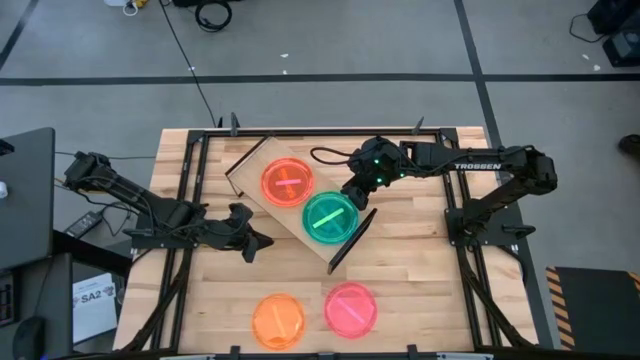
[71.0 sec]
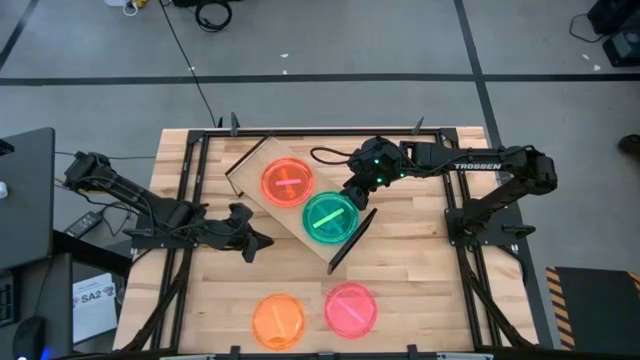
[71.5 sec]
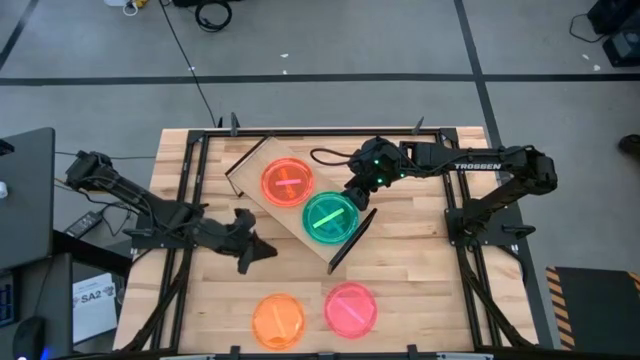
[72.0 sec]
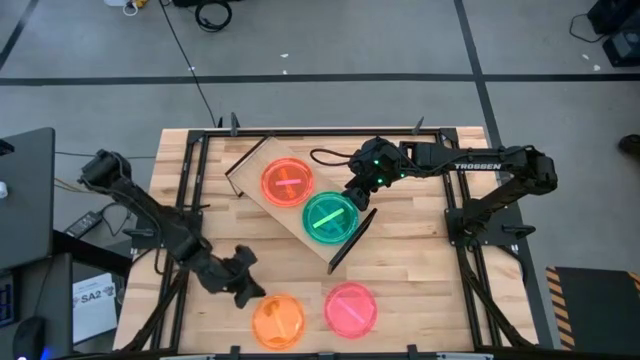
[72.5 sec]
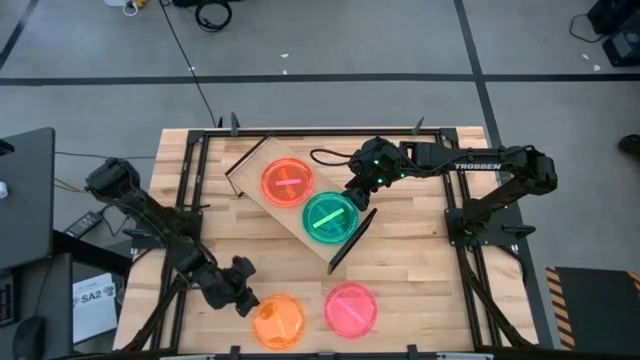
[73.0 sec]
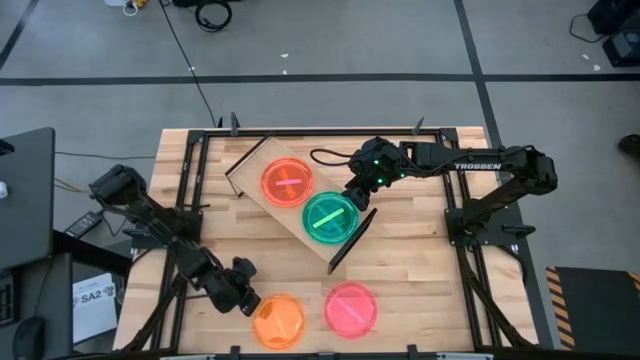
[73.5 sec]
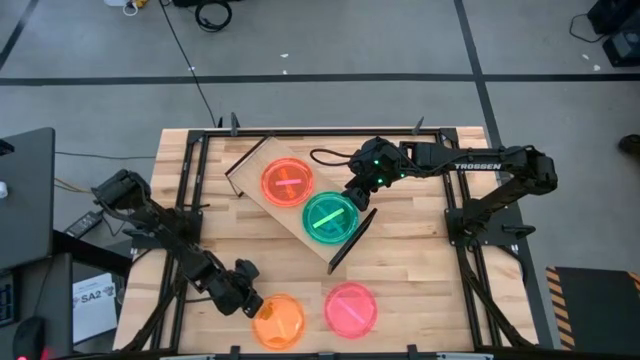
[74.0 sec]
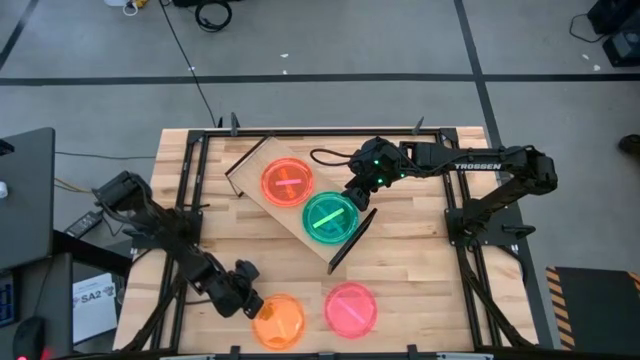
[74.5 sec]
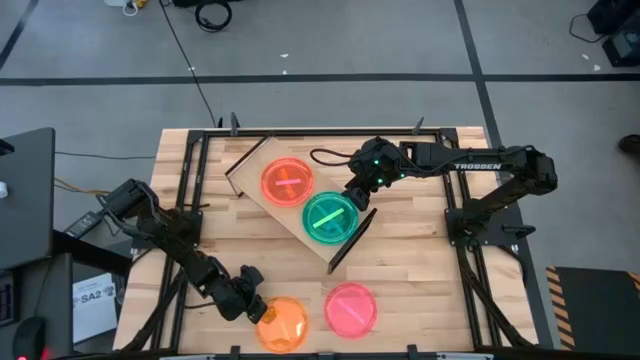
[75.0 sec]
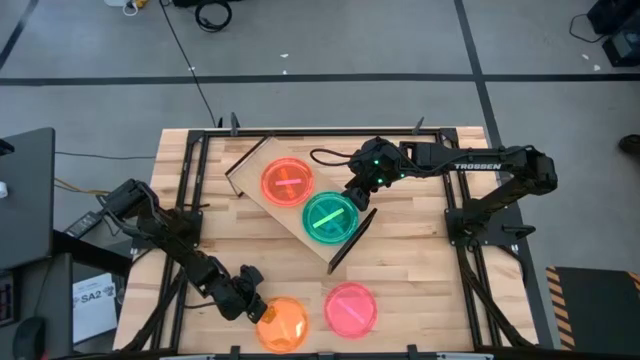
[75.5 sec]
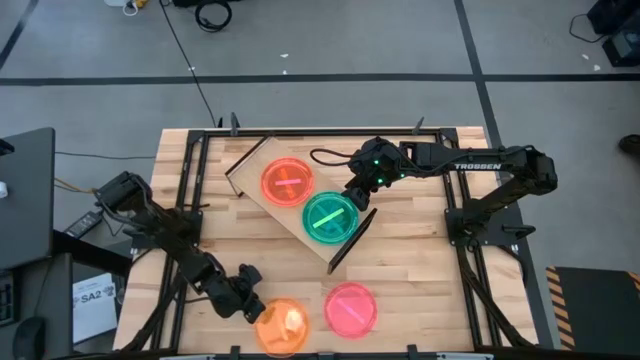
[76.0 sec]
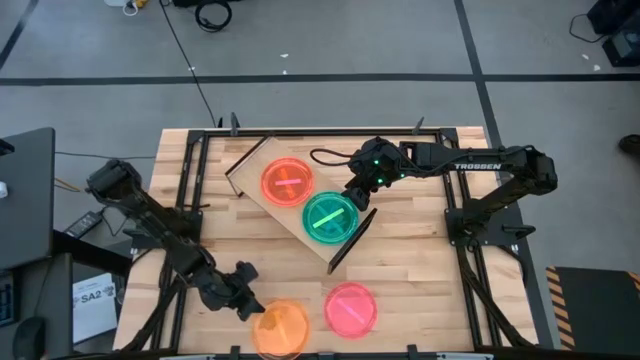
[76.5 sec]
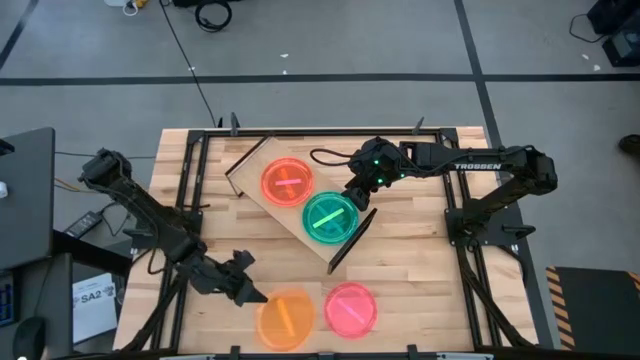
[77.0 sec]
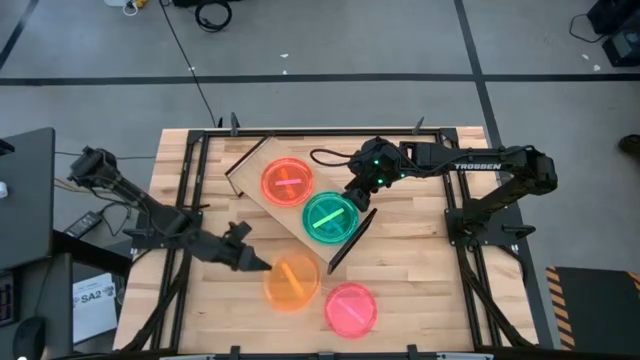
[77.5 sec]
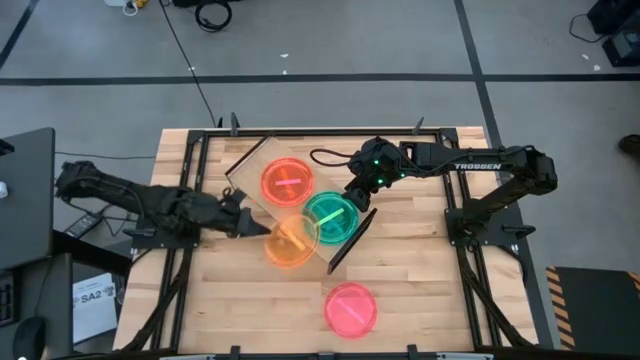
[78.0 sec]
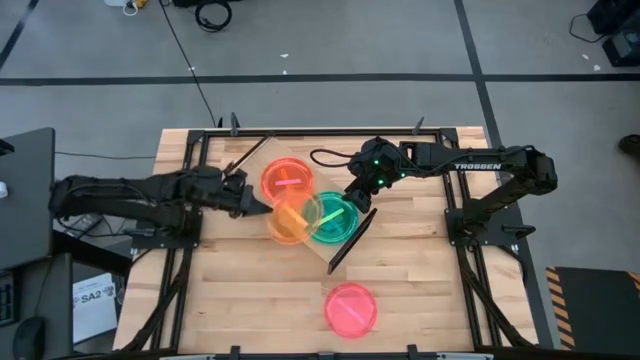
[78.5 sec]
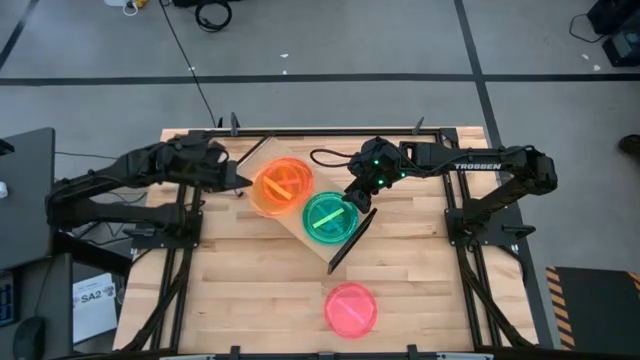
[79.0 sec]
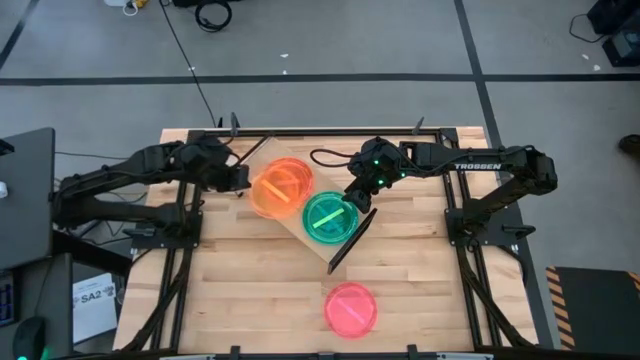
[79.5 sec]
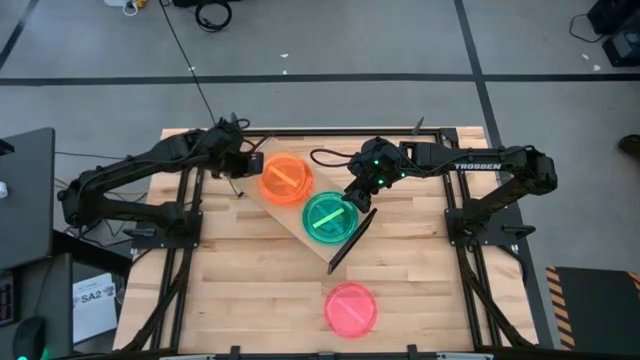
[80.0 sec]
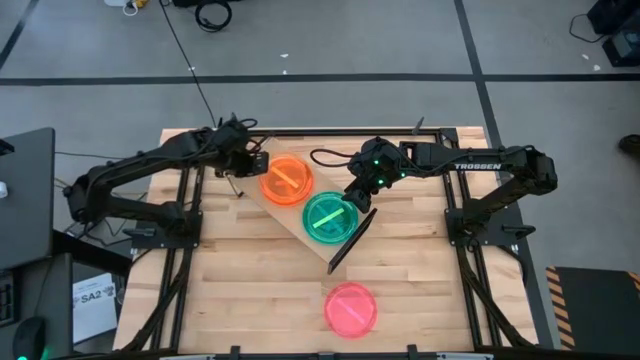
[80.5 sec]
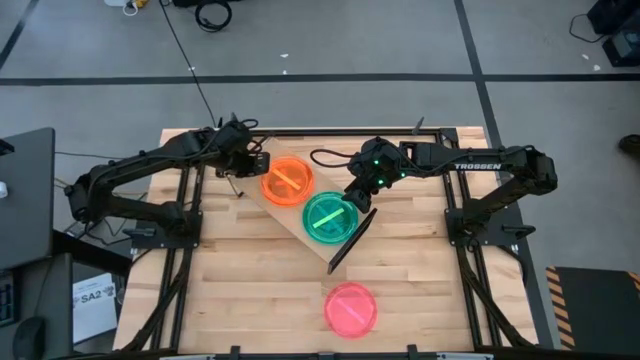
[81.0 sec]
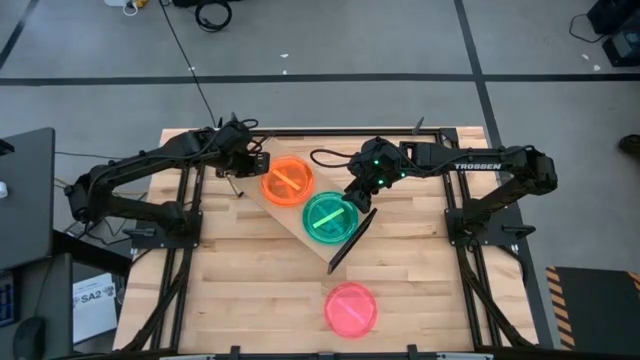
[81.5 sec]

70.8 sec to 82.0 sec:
Task: Place and stack plates onto a shelf
Stack the orange plate on top of the pink plate on the shelf

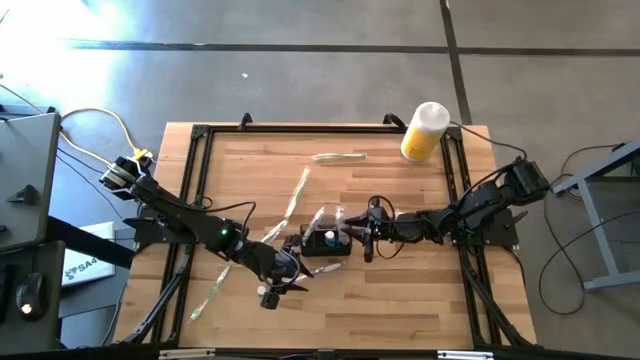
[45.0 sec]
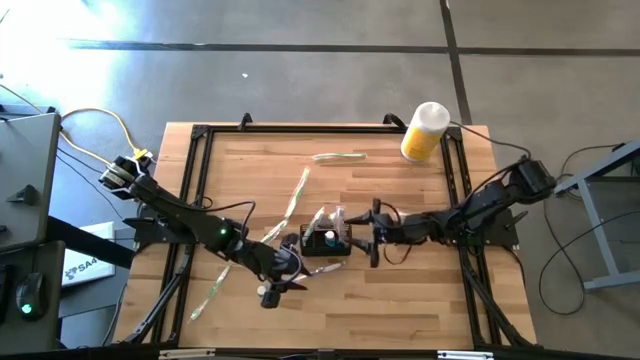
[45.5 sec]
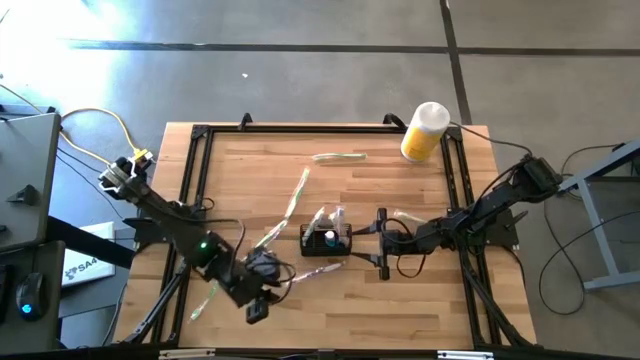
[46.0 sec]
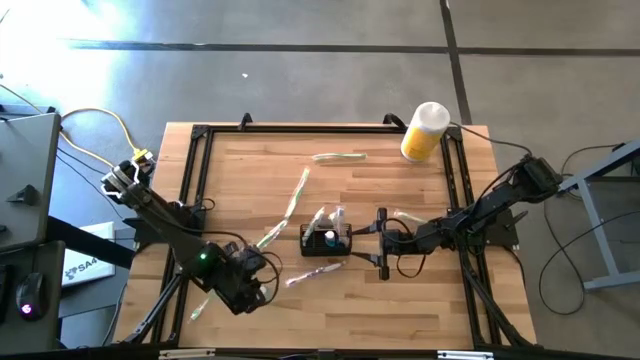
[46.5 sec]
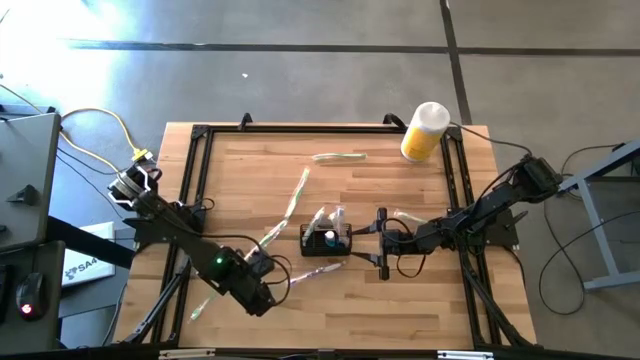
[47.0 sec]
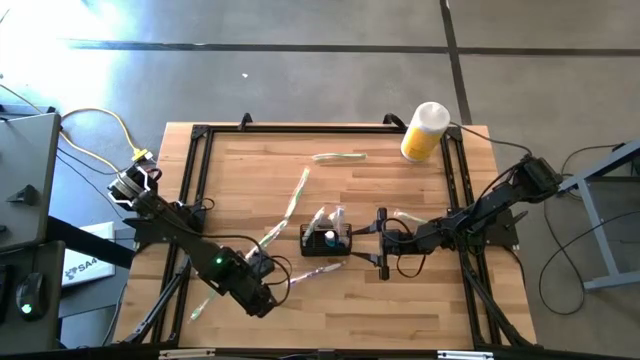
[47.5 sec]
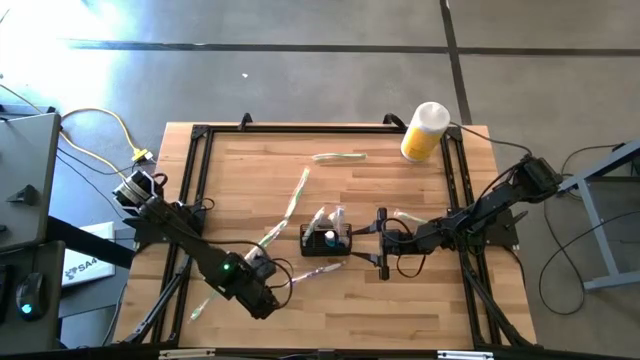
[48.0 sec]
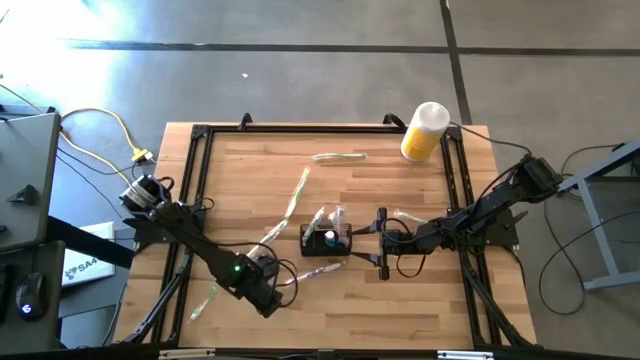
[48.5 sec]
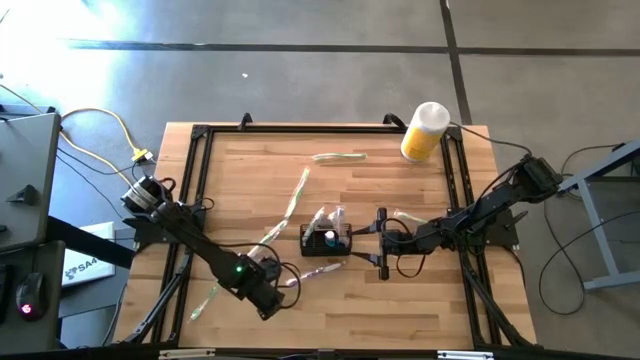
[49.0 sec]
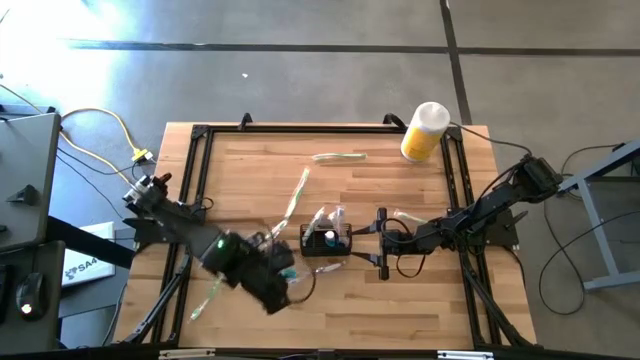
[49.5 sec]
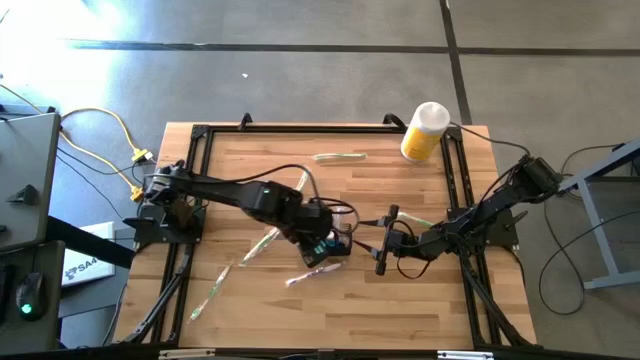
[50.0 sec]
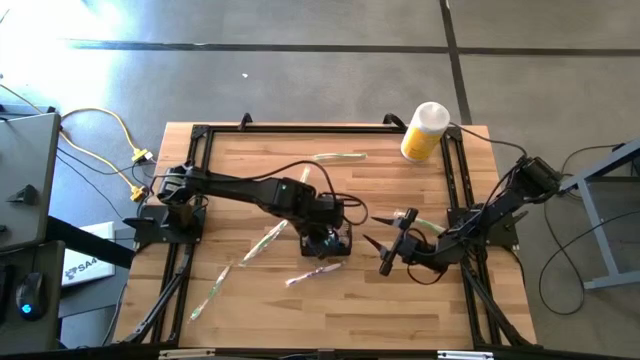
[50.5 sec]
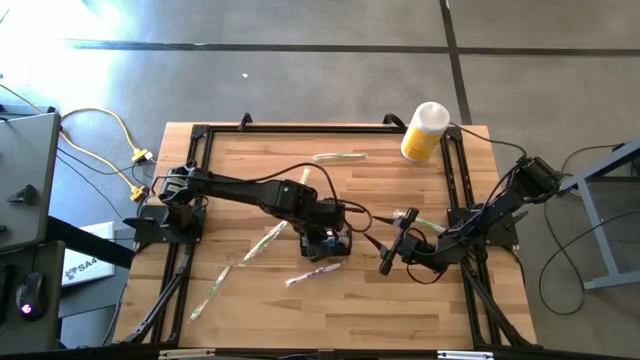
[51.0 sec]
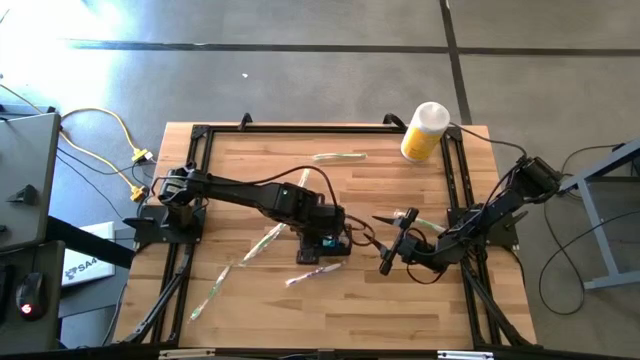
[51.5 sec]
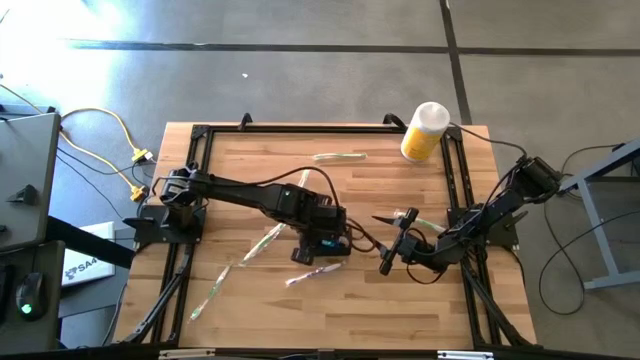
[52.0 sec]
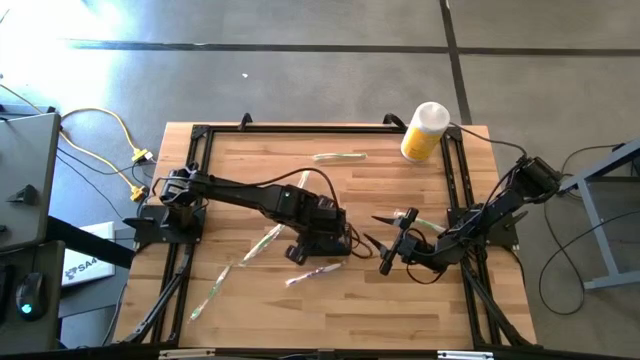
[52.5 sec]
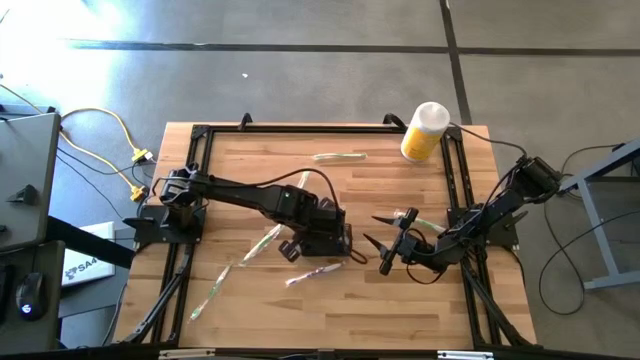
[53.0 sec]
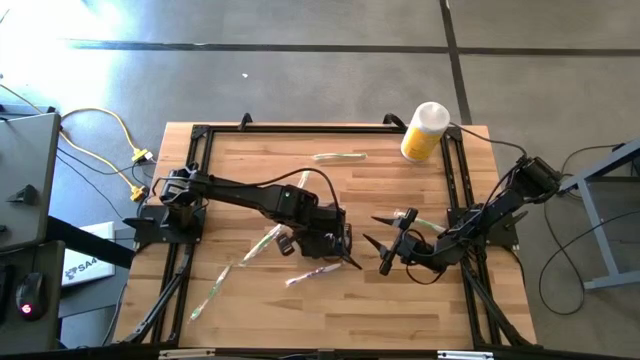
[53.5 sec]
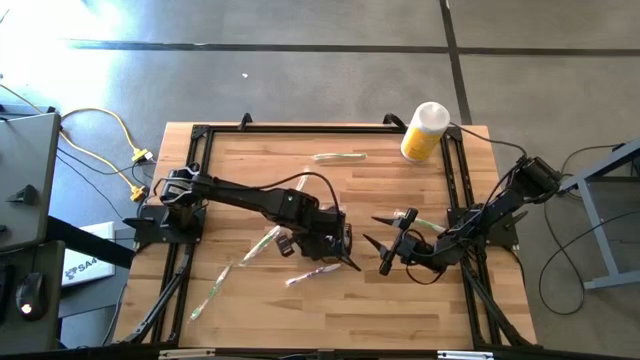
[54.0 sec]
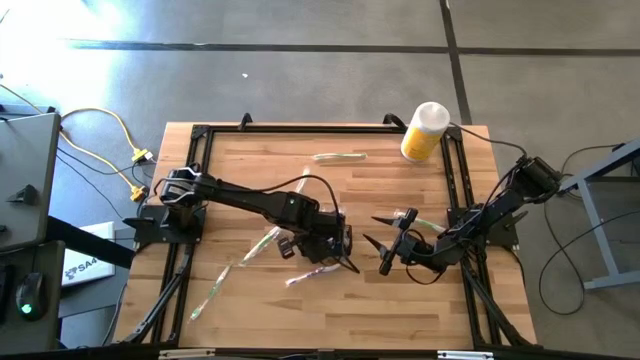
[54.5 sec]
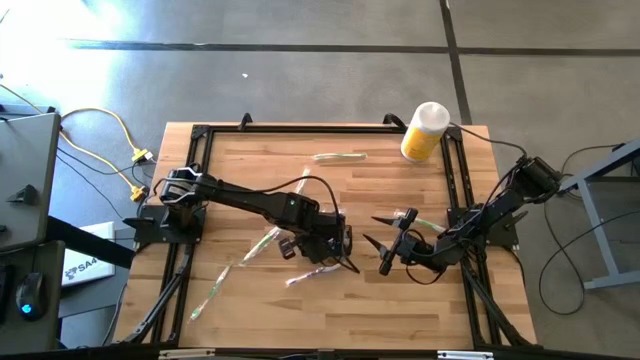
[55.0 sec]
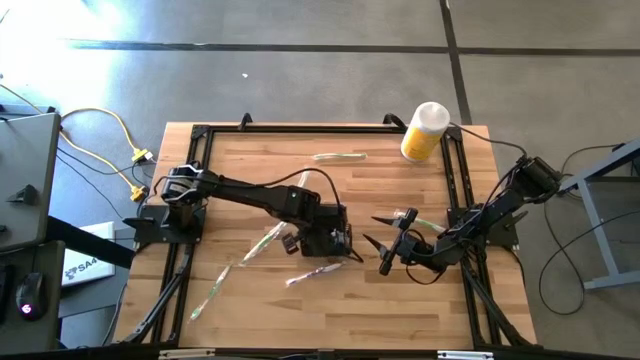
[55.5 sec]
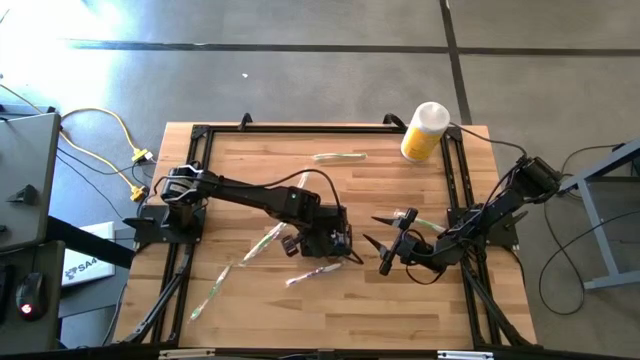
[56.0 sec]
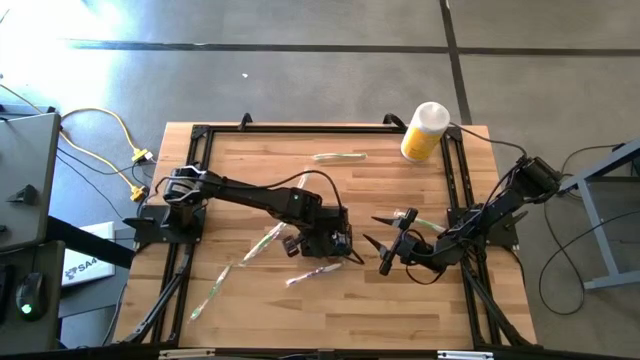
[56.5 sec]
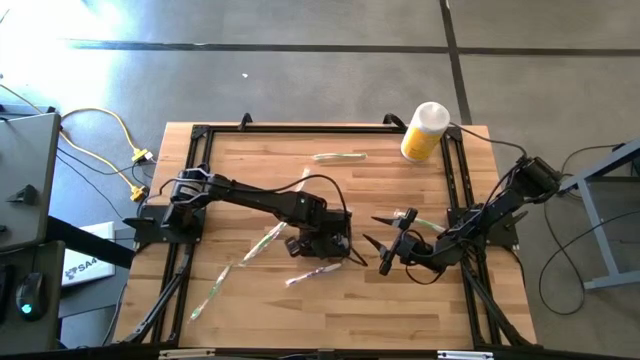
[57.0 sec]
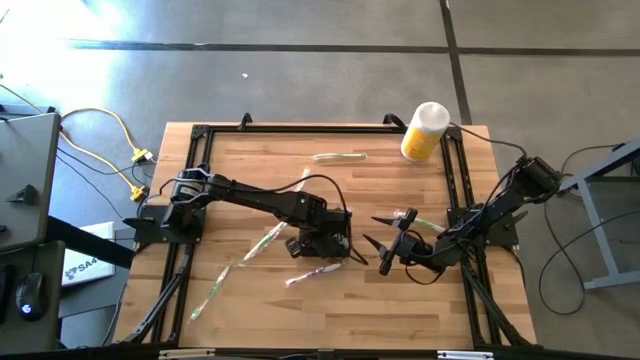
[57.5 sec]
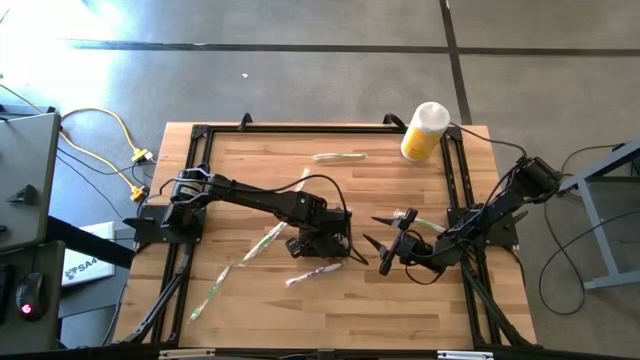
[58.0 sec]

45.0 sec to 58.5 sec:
Task: Pick & Place toothbrushing station
Put the blue mouthwash into the black wire organizer
